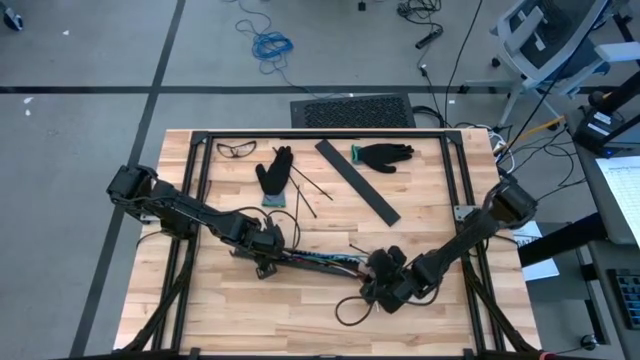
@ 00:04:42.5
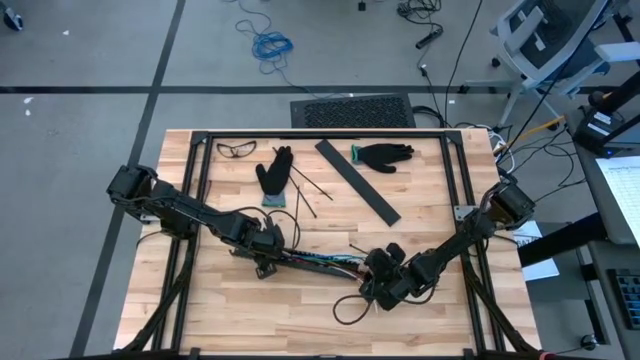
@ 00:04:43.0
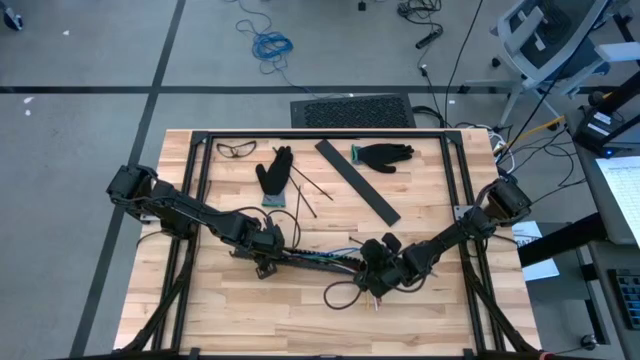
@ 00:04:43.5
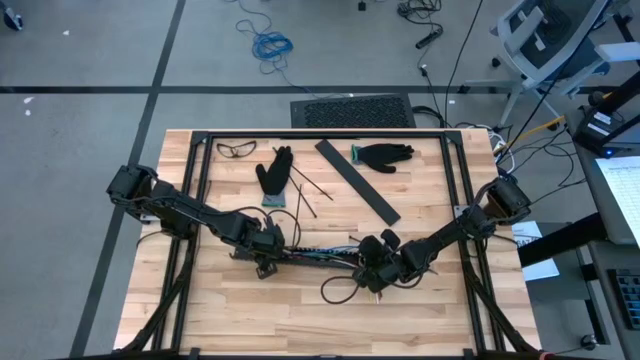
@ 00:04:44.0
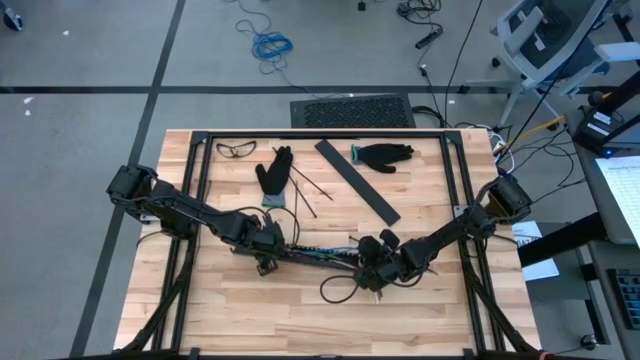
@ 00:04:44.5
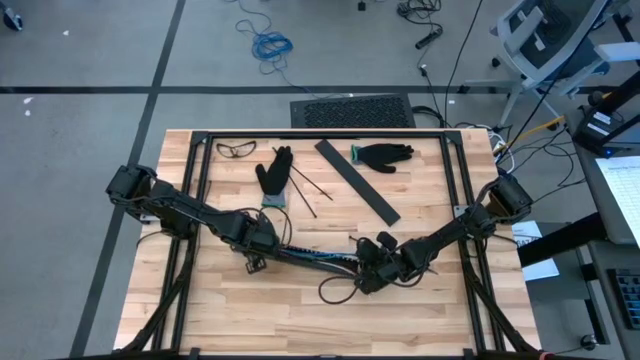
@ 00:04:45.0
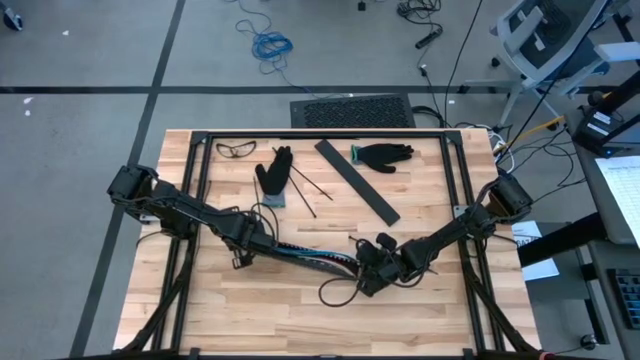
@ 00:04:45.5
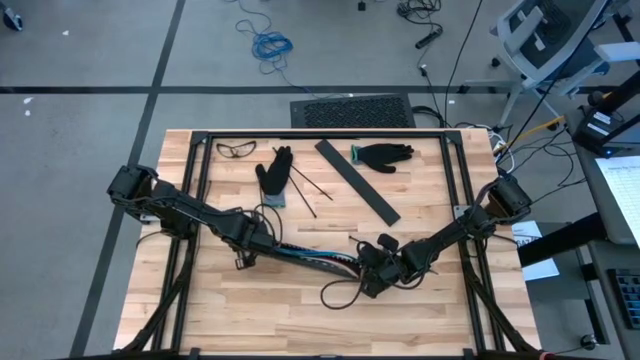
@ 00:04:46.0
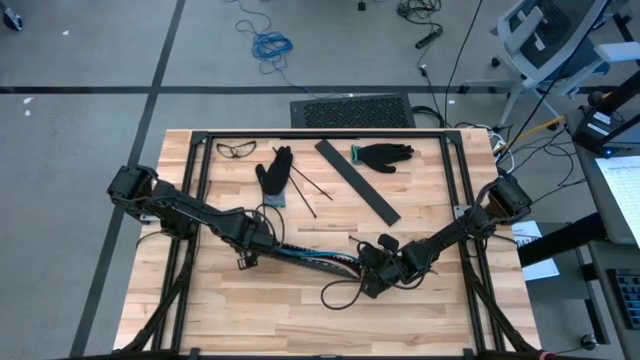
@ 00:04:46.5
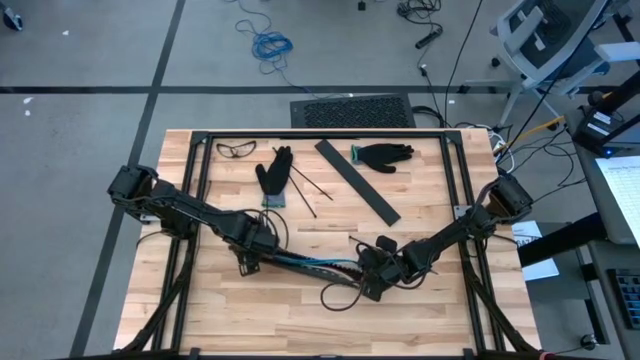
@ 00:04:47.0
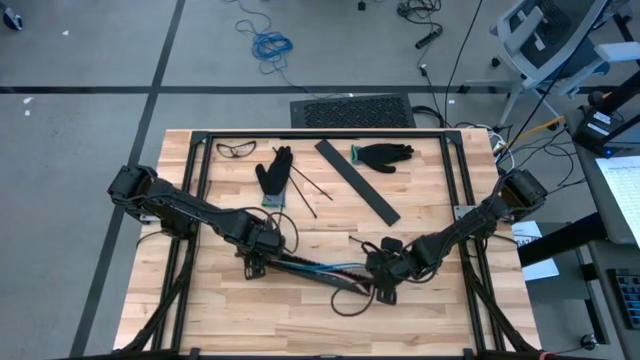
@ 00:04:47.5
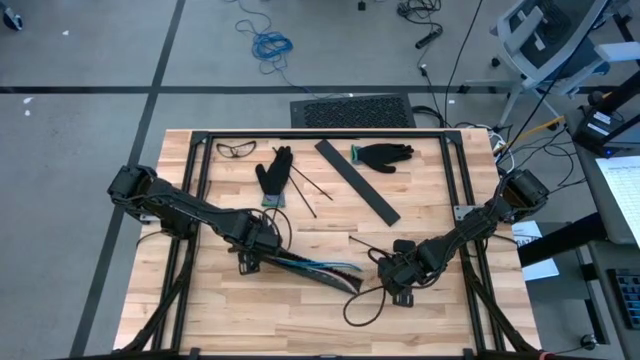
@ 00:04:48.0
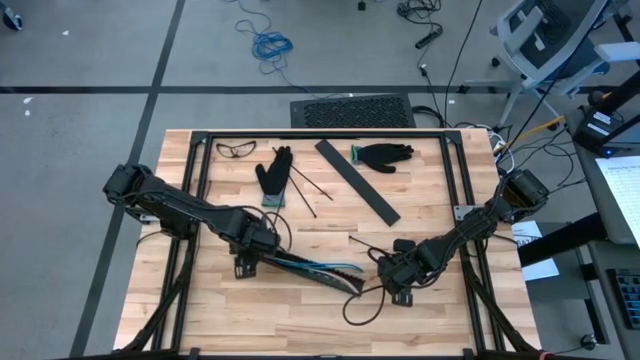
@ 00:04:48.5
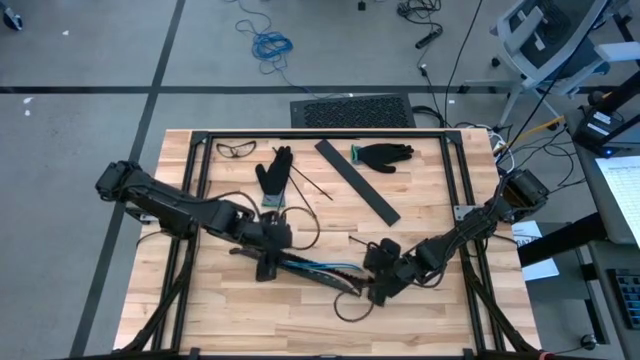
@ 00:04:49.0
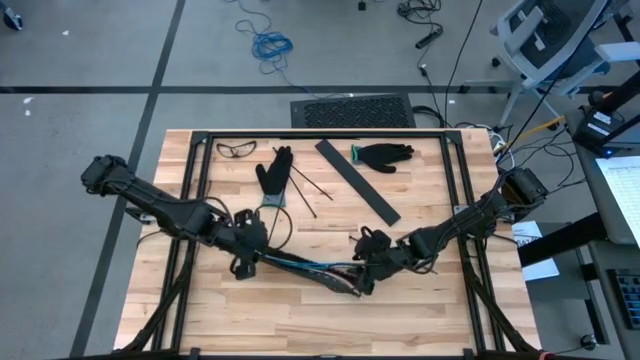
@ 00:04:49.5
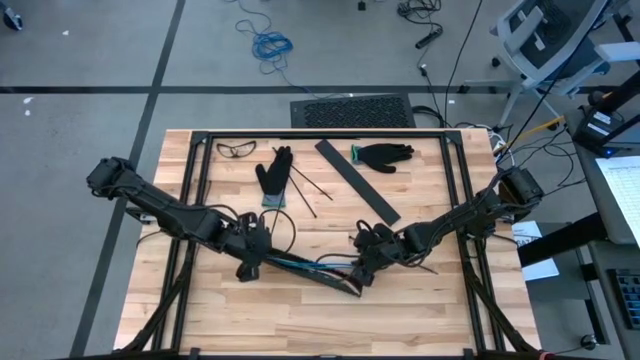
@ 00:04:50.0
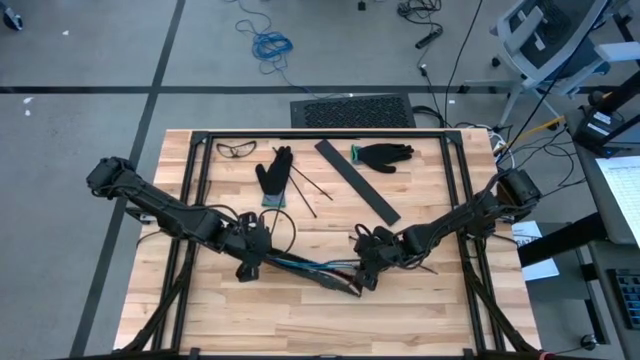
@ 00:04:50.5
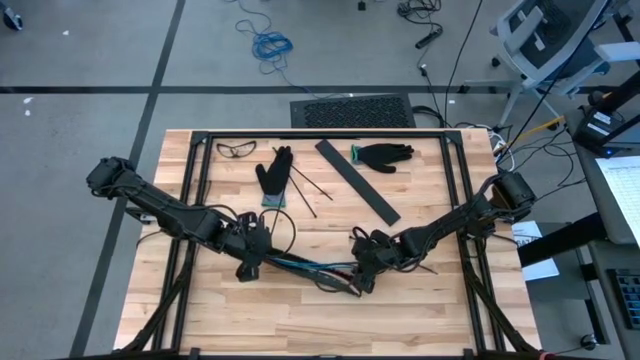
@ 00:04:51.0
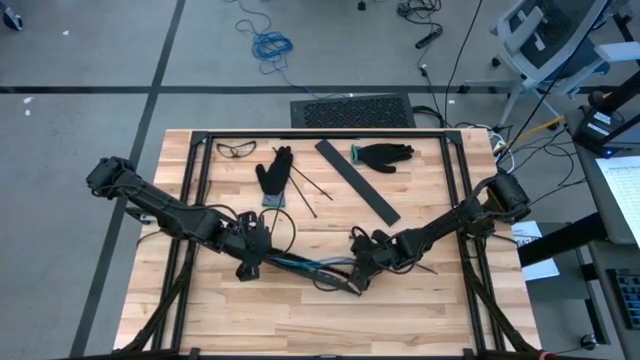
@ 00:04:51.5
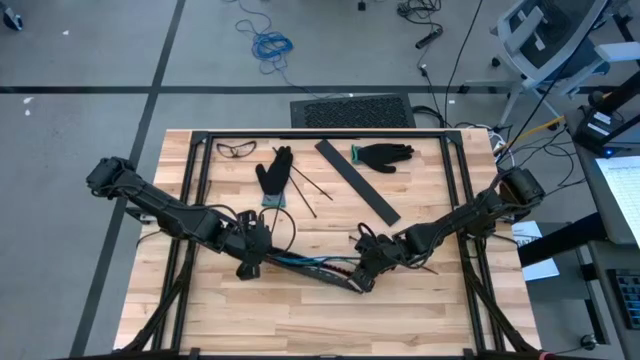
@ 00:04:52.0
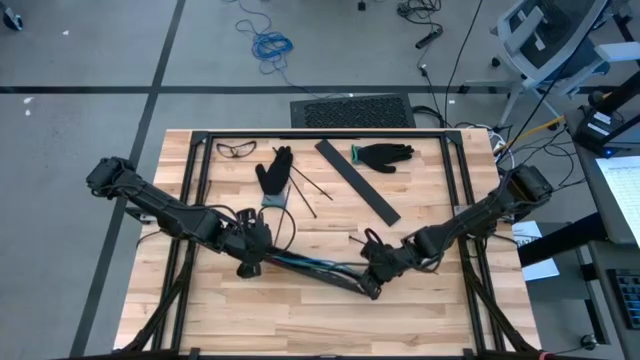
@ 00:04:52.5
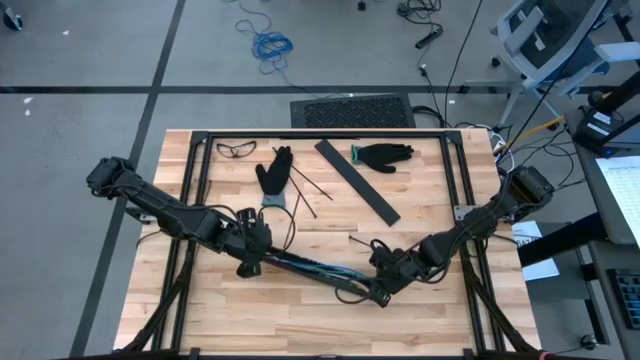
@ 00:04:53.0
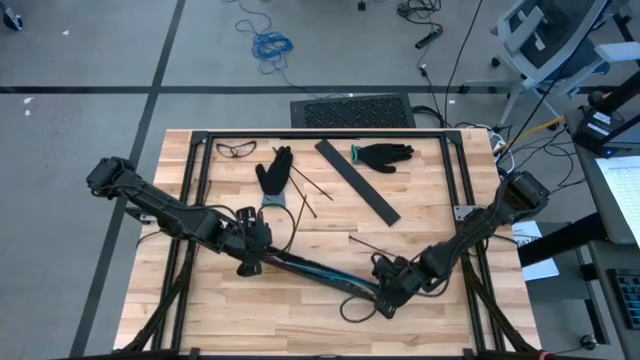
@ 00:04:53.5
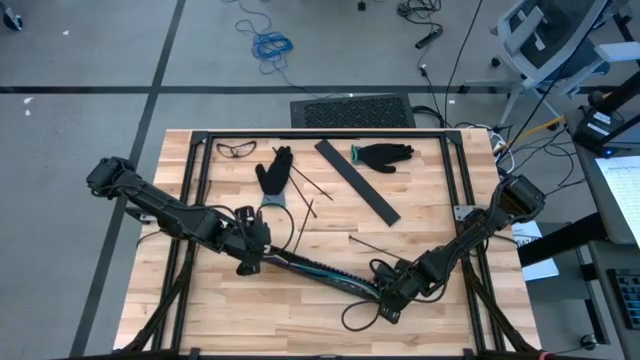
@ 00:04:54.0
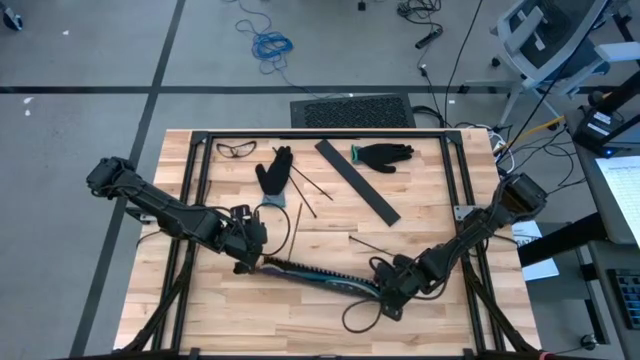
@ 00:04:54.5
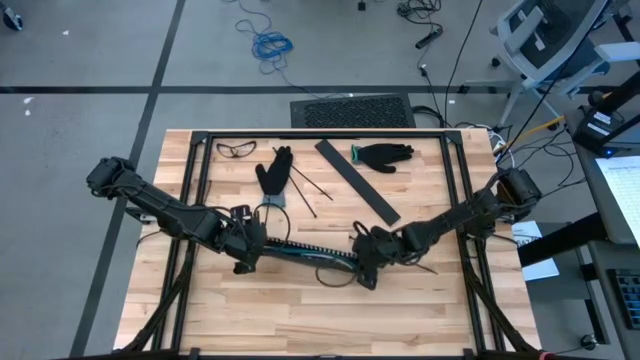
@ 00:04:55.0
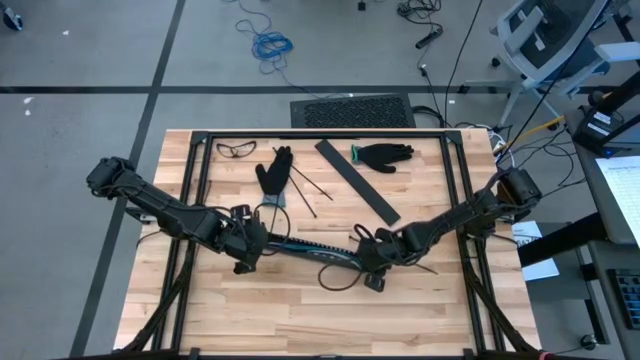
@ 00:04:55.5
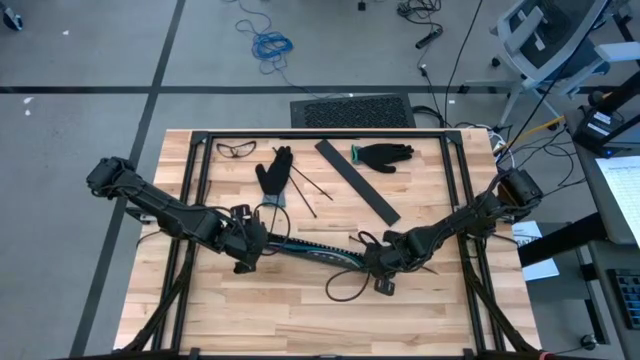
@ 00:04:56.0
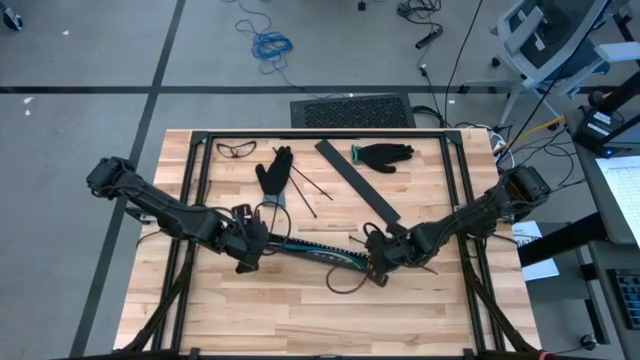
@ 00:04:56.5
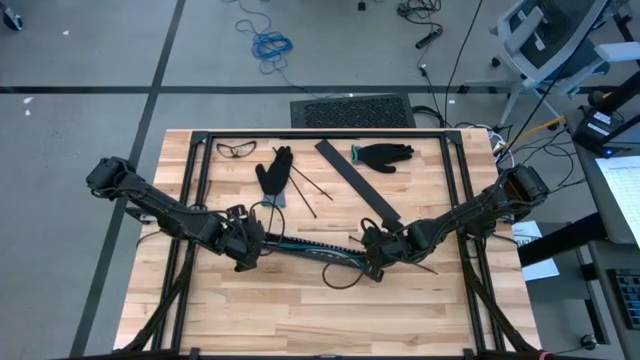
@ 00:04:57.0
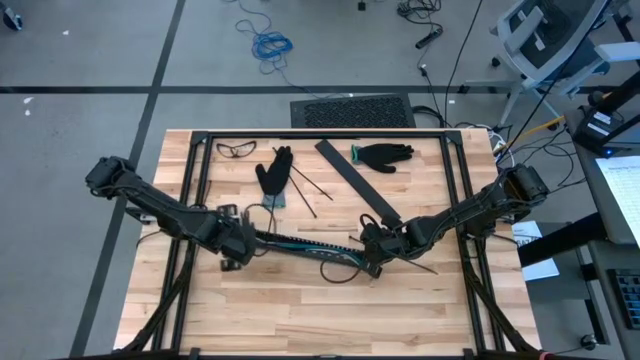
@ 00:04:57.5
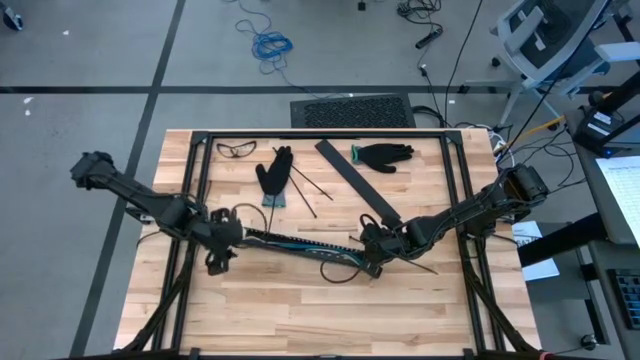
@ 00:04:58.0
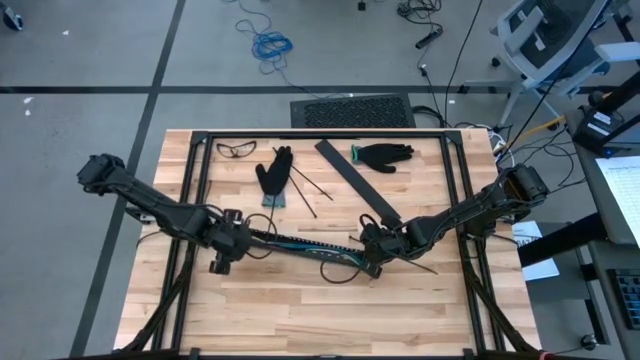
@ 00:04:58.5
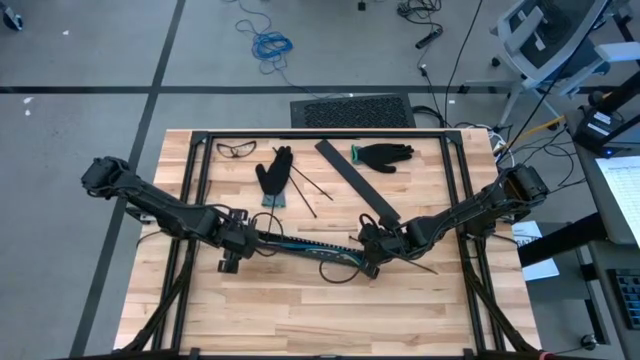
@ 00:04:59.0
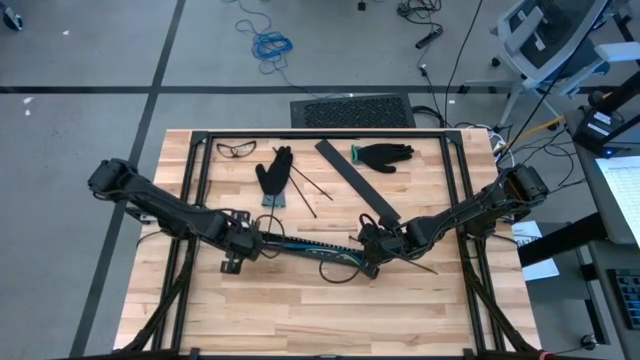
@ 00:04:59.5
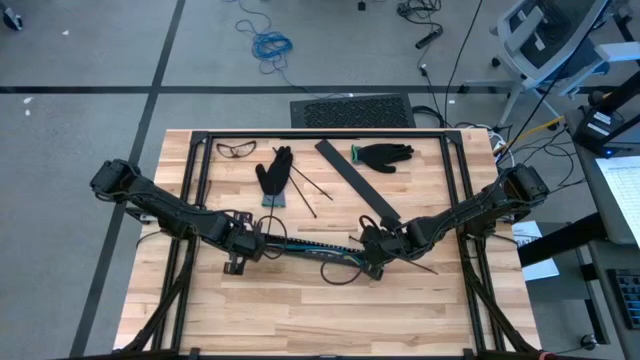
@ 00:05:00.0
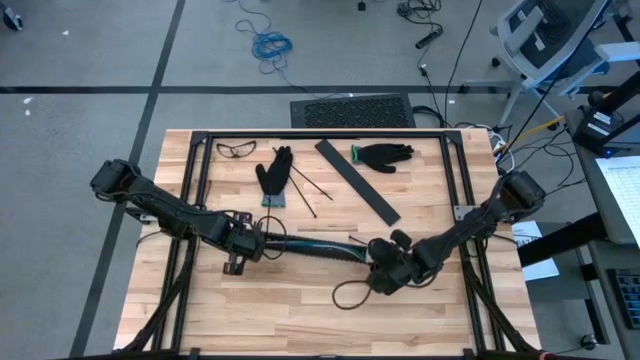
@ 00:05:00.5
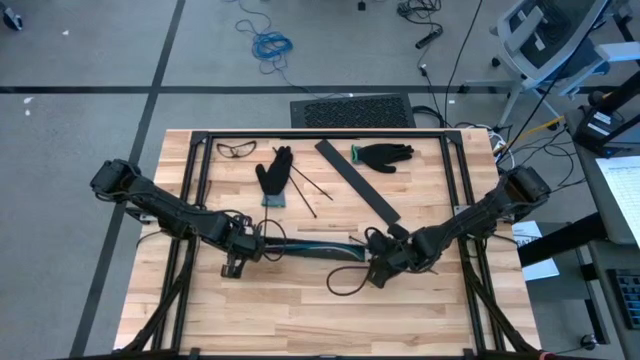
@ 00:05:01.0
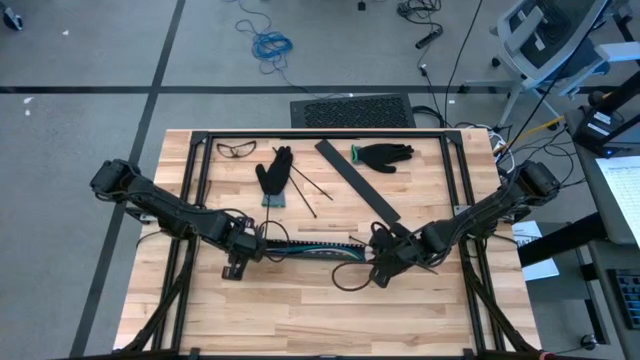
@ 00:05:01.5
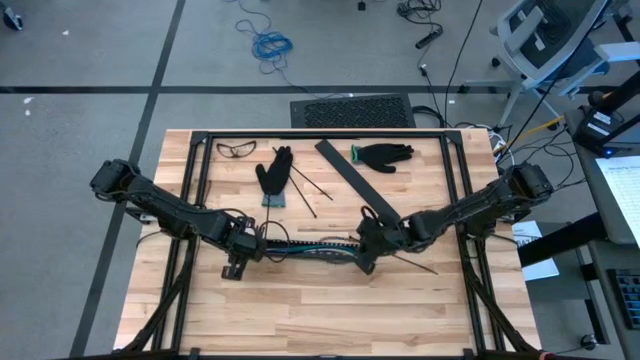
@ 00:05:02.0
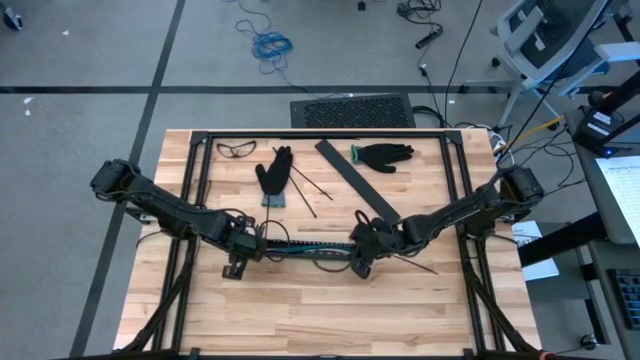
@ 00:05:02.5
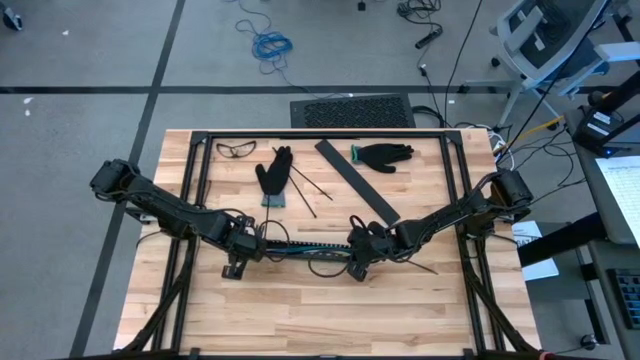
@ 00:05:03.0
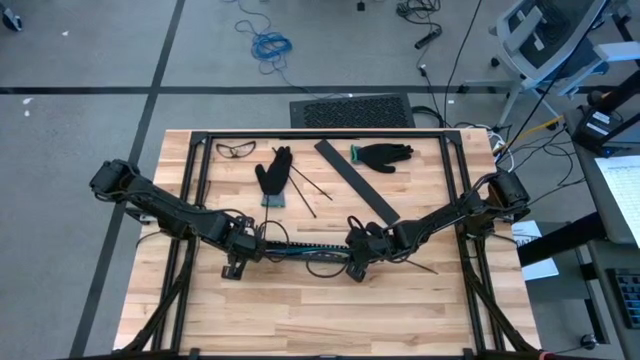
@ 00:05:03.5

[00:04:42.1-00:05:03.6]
Task: Ziptie cables
Put the ziptied cables in the black cable duct

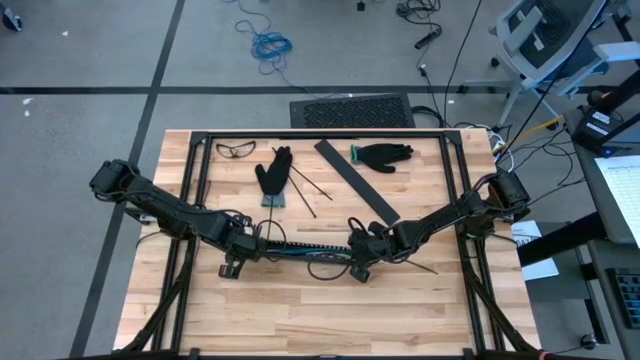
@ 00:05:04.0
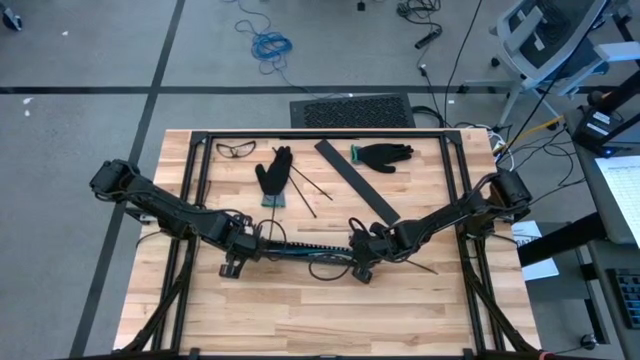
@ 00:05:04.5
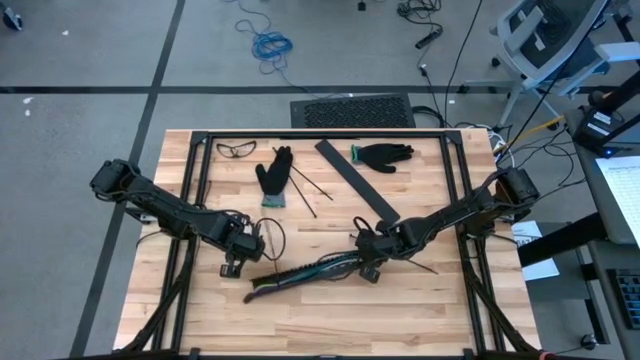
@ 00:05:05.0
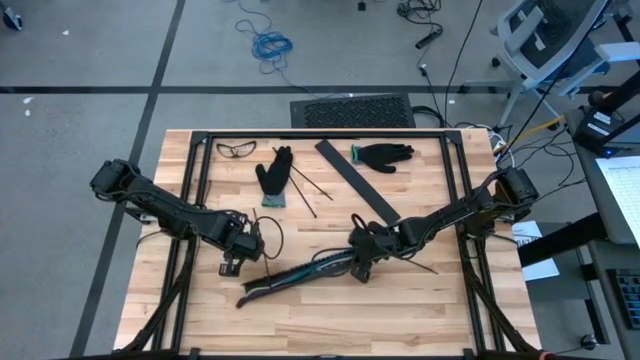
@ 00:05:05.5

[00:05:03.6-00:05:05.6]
Put the ziptied cables in the black cable duct
